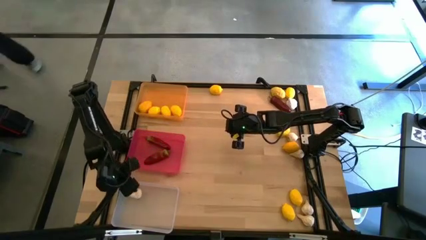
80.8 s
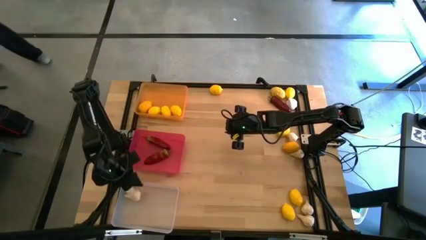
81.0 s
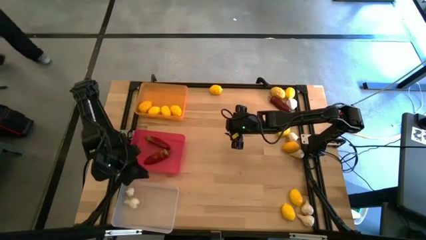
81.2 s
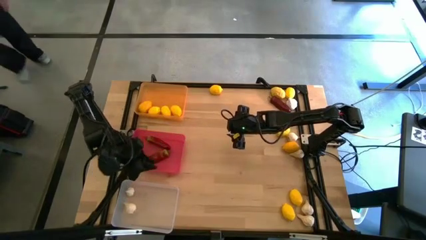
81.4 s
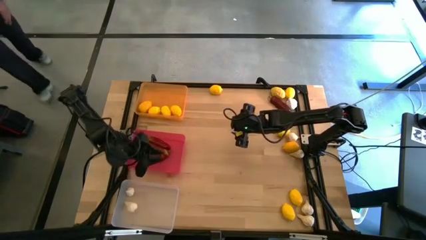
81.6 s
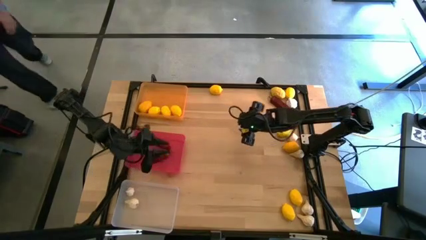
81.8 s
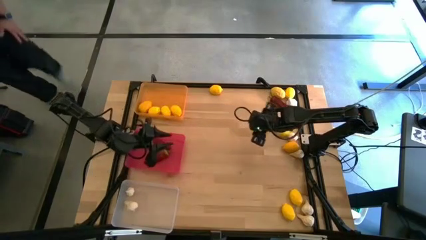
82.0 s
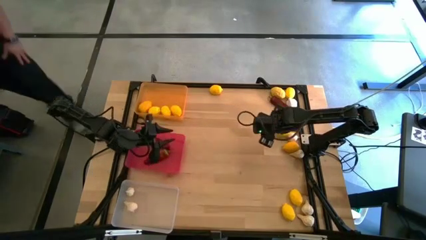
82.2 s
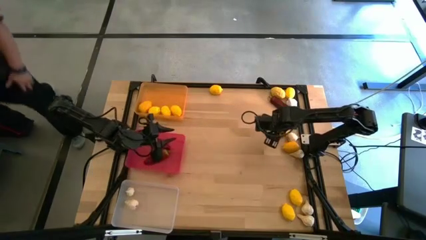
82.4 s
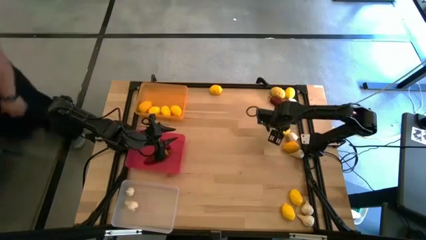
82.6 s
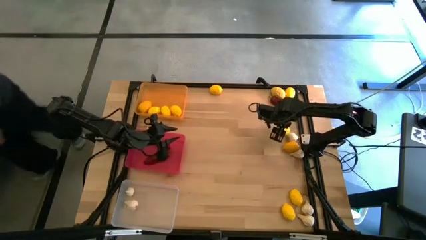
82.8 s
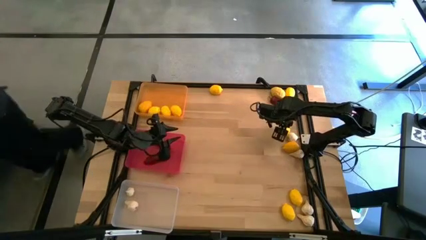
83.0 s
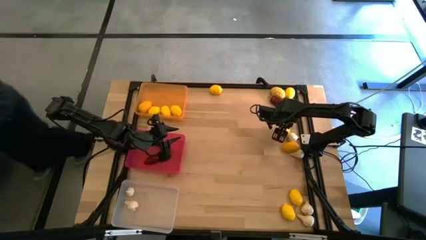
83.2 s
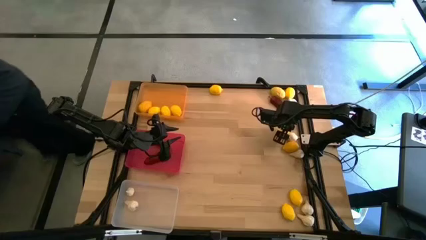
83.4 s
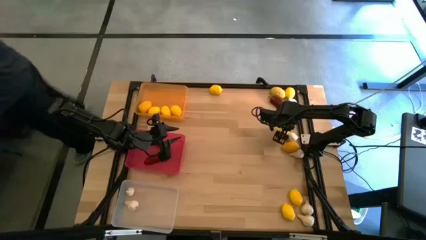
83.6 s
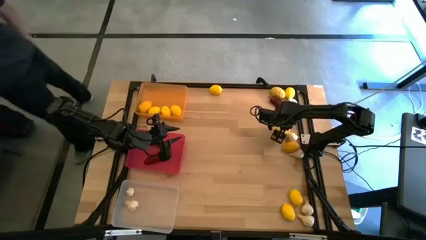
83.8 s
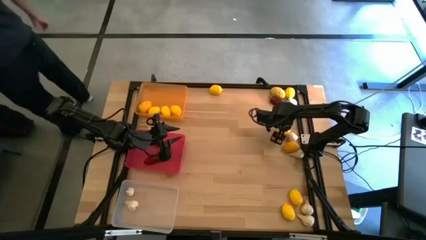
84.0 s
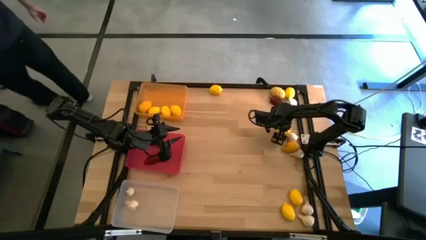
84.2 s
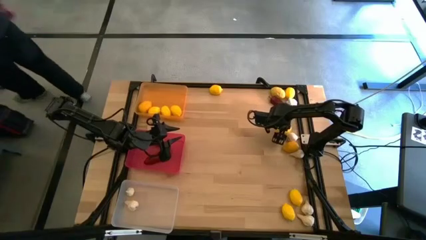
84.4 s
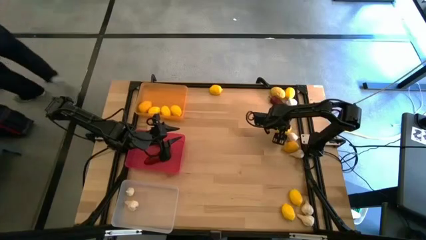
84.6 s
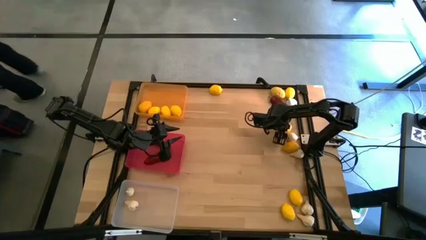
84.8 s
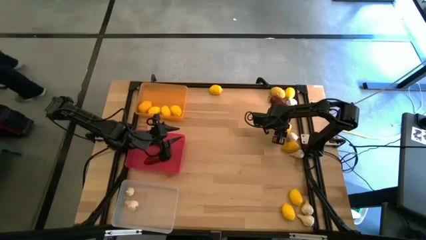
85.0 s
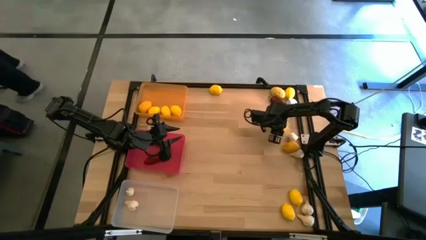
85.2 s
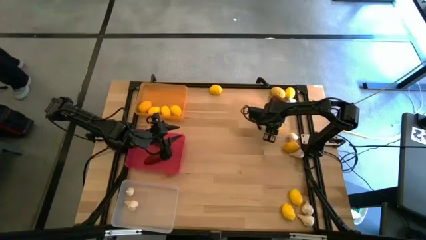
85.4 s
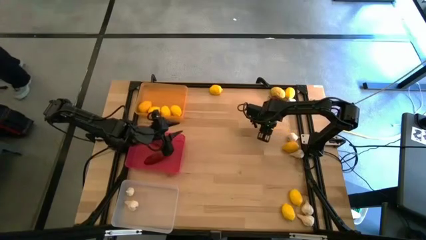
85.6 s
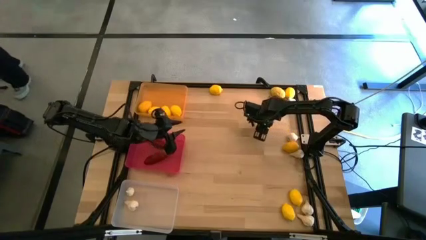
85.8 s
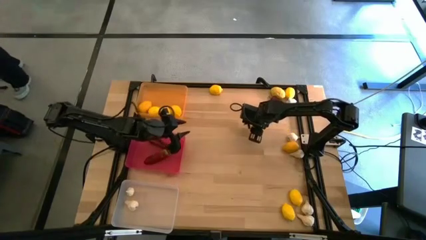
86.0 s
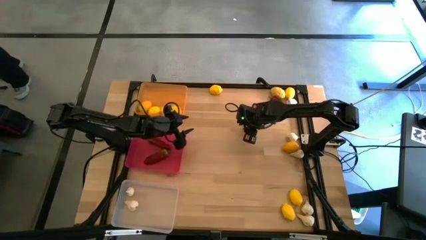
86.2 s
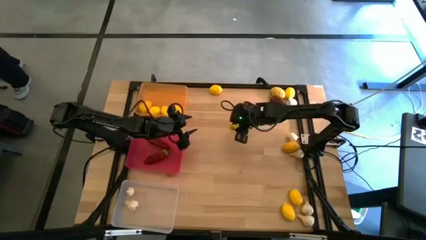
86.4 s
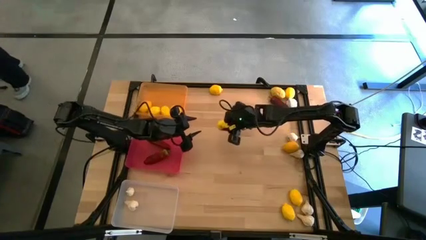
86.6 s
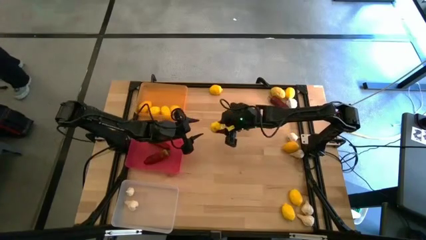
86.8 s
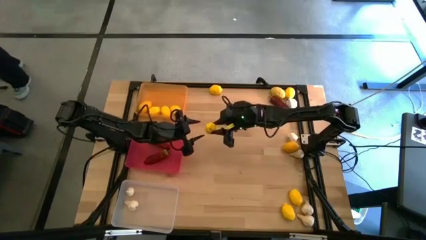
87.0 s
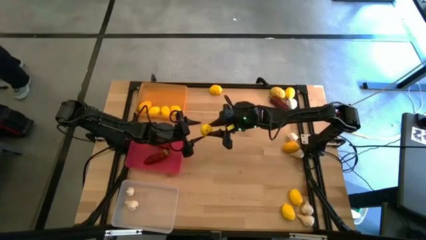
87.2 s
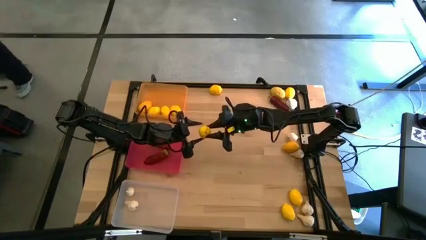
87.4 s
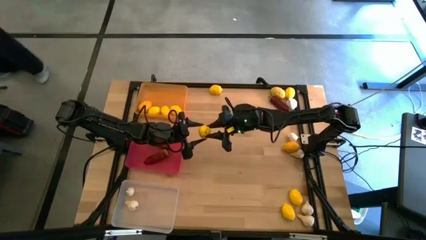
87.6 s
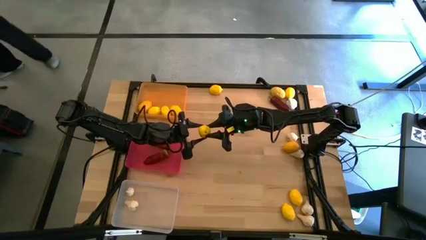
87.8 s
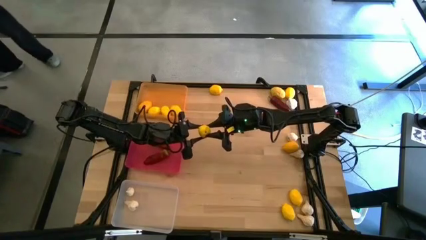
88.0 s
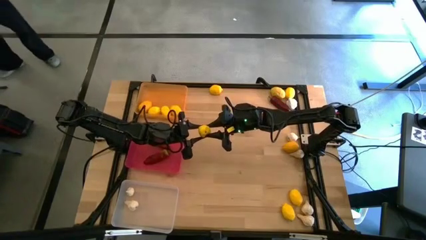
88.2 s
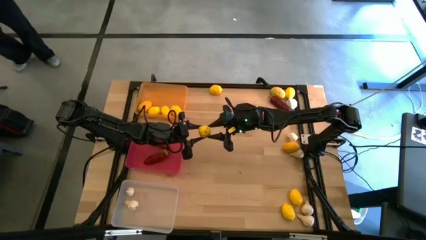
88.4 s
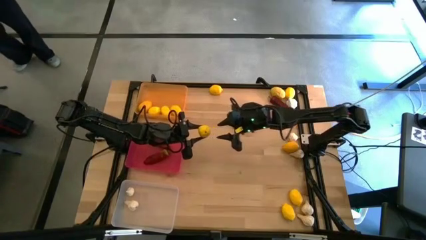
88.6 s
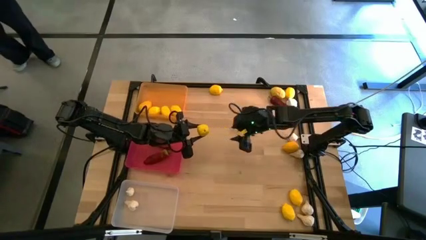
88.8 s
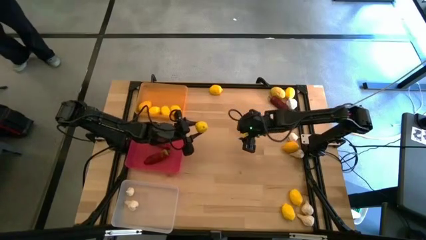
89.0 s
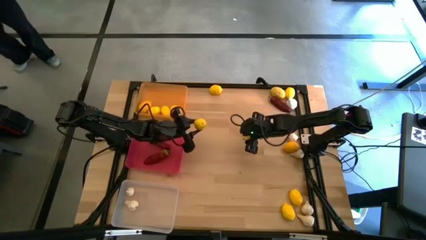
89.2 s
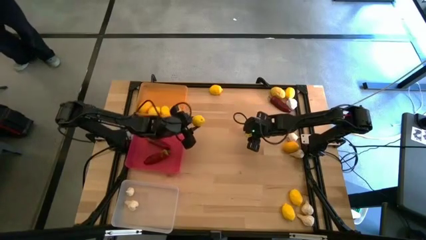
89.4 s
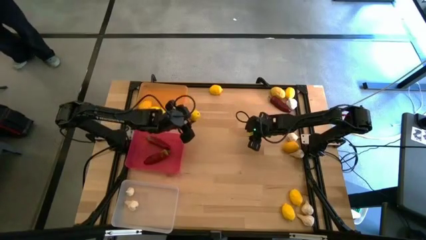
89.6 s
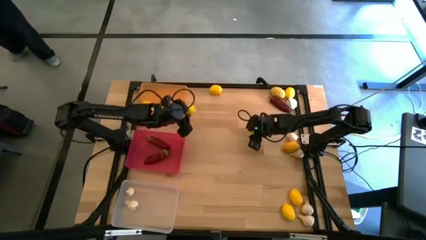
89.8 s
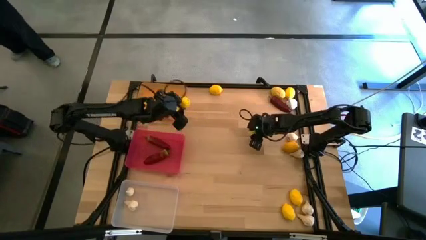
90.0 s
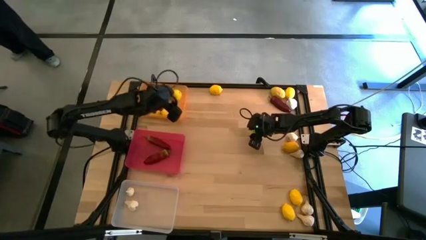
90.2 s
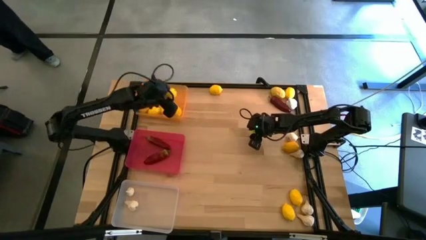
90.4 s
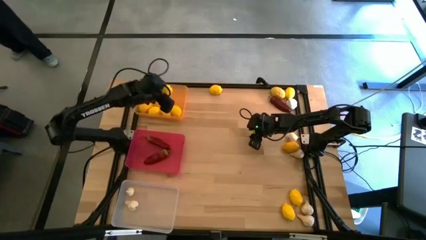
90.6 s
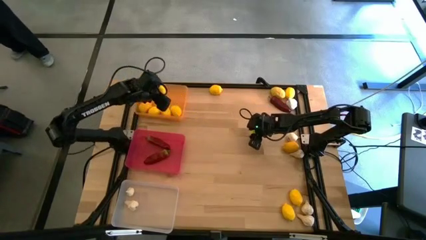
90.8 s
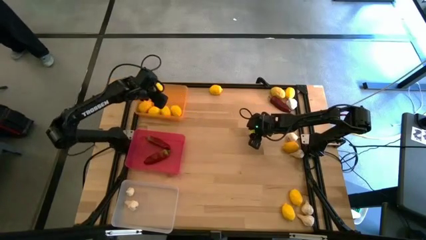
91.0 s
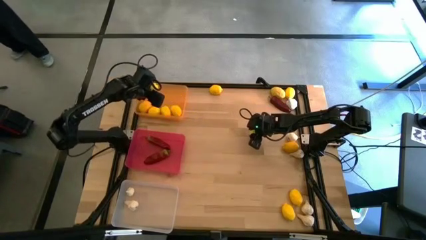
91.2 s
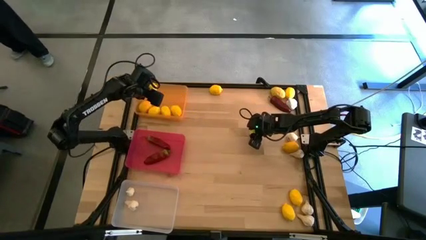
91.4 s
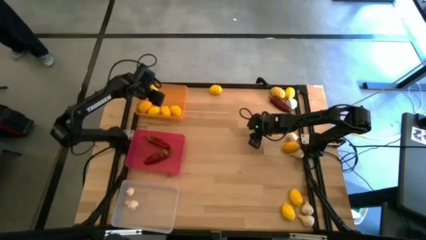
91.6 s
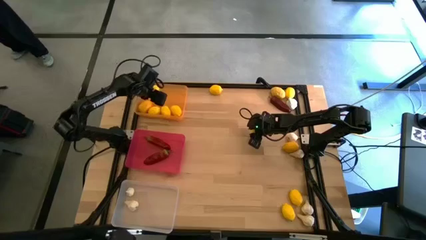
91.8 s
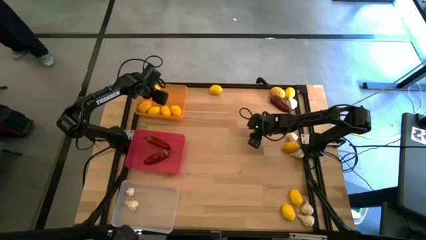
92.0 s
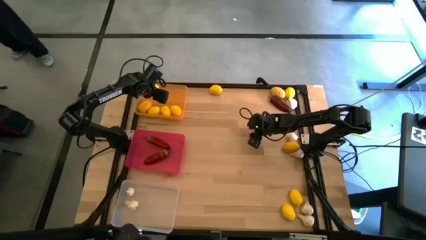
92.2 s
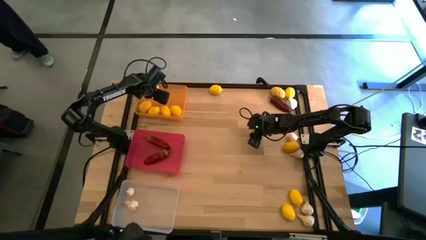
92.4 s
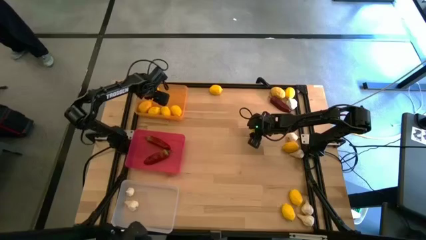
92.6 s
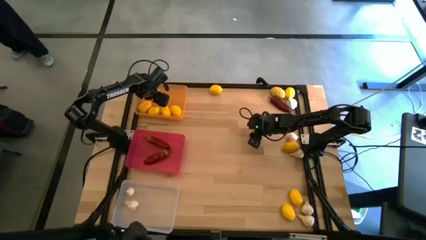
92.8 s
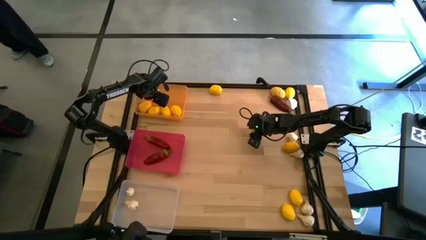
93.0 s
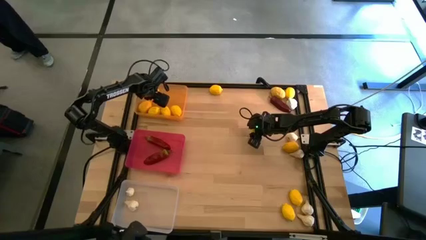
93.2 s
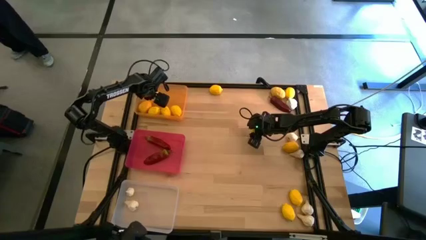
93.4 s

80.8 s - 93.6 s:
Task: Sort produce into baskets
Put the lemon into the yellow bin

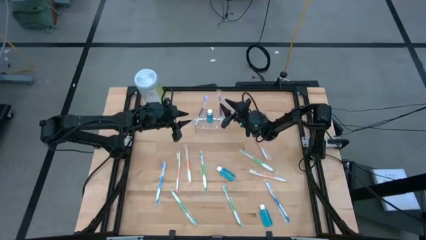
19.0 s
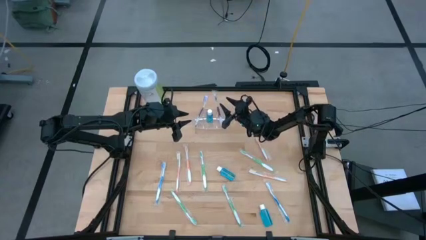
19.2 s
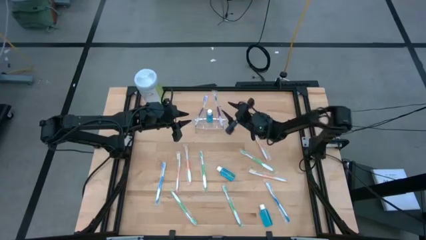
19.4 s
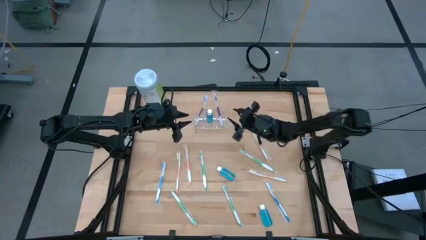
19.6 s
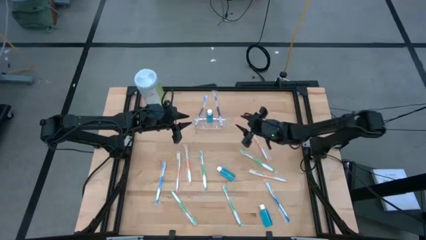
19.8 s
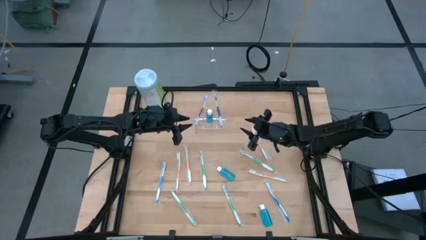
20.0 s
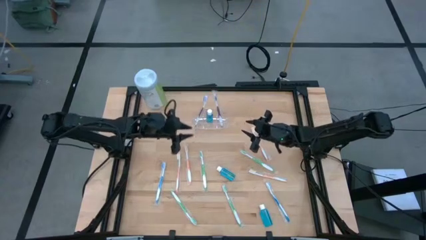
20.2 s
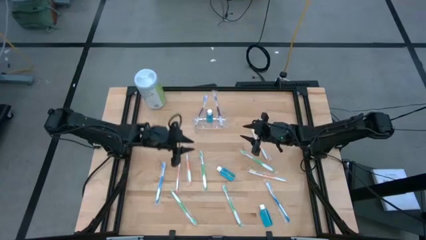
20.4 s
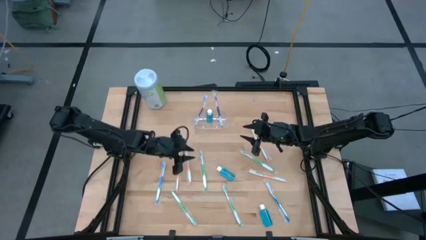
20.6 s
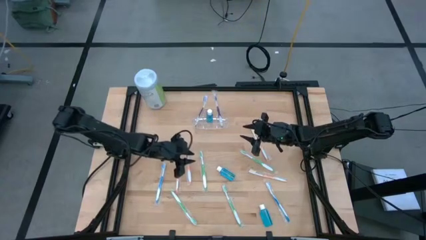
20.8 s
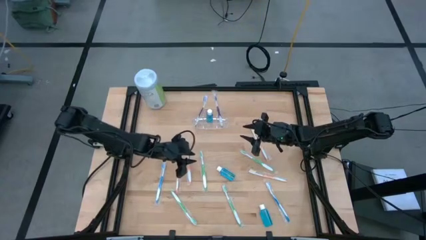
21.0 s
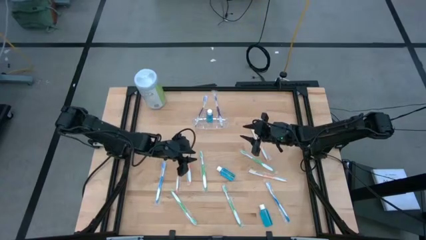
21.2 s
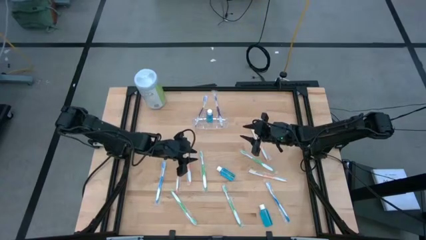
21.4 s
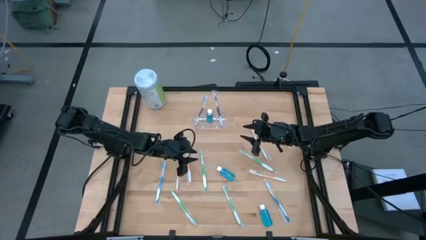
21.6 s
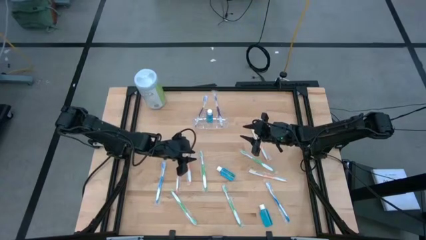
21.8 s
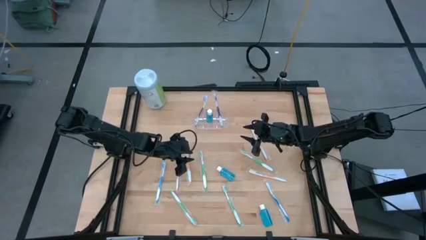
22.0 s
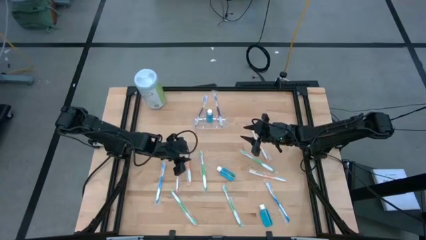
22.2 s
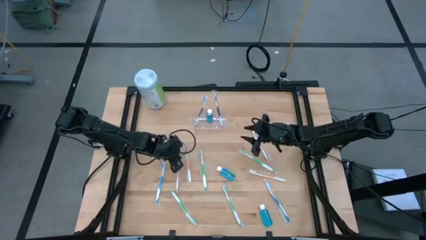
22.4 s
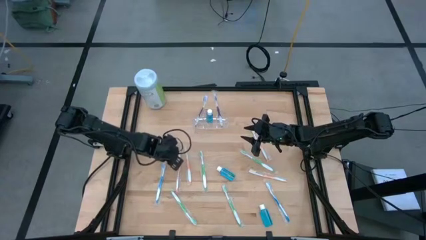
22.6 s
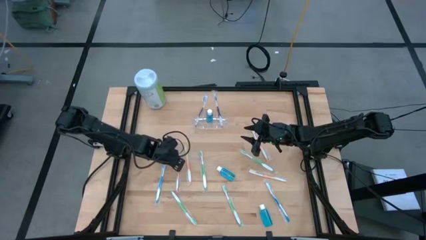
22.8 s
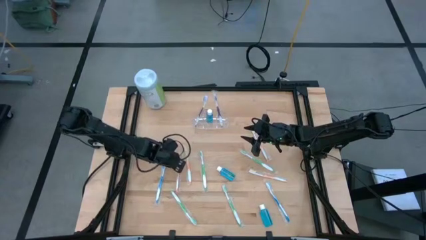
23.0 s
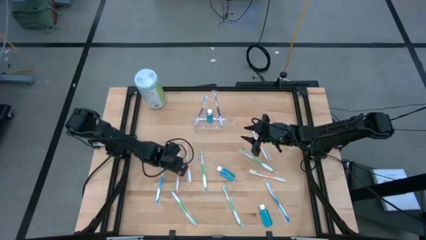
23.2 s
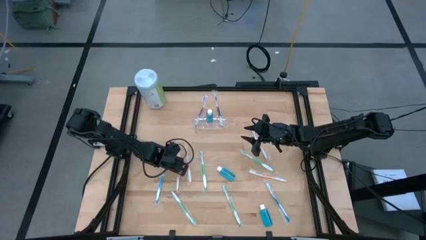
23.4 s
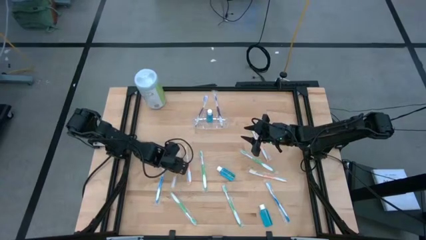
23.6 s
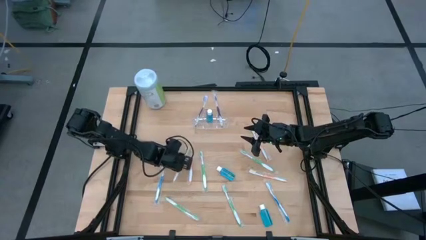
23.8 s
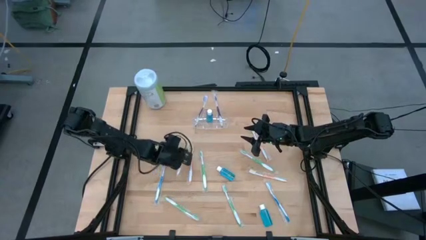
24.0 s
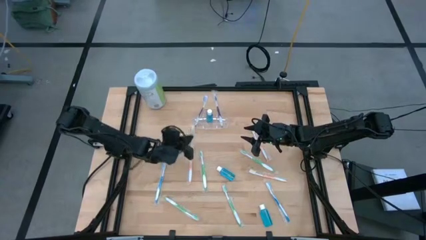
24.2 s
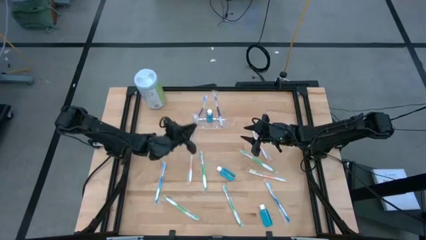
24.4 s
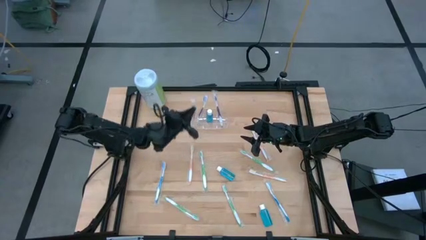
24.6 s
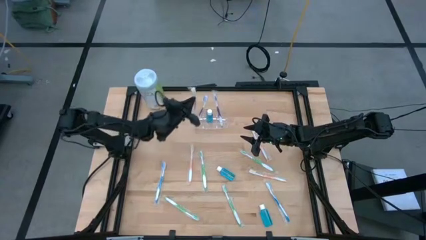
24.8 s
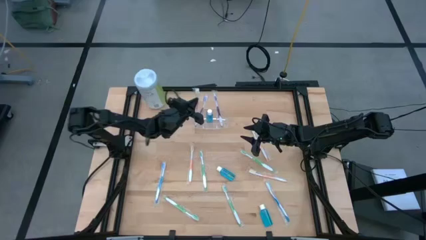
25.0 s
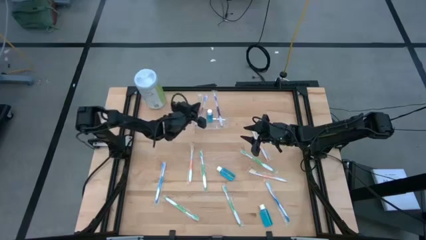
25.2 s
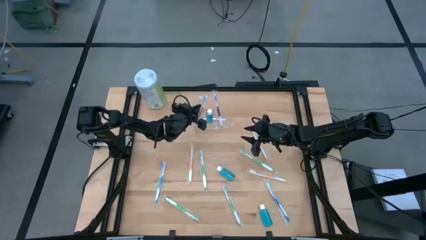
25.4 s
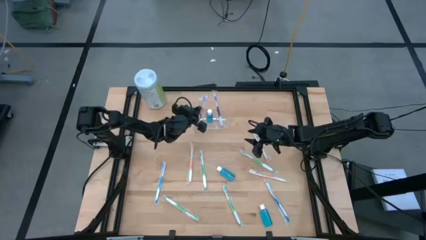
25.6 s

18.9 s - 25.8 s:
Task: Pick & Place toothbrushing station
Put the orange toothbrush to the left of the transparent organizer
